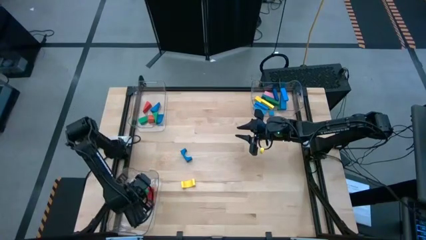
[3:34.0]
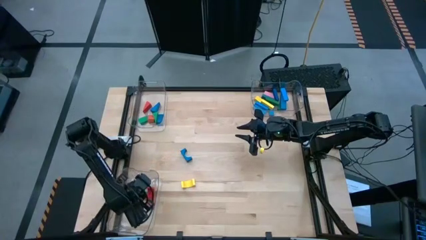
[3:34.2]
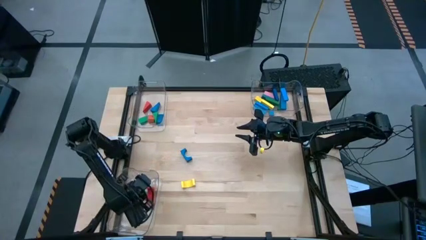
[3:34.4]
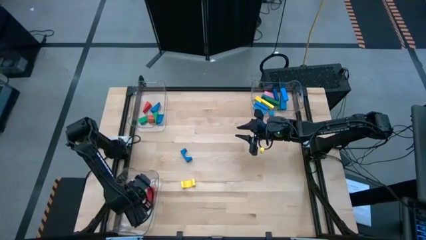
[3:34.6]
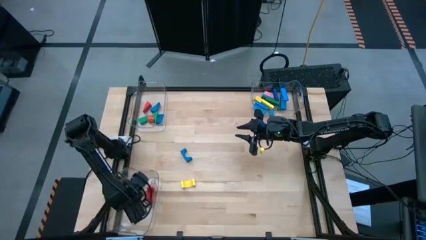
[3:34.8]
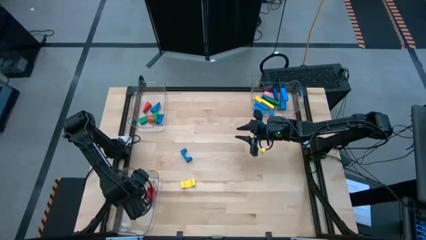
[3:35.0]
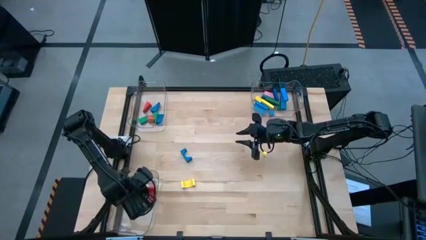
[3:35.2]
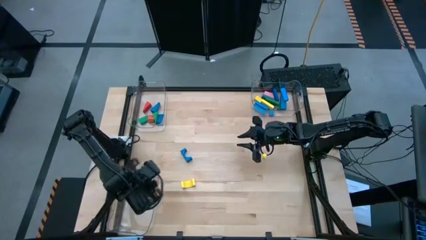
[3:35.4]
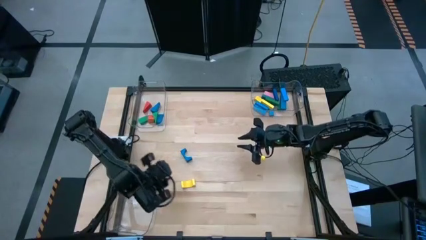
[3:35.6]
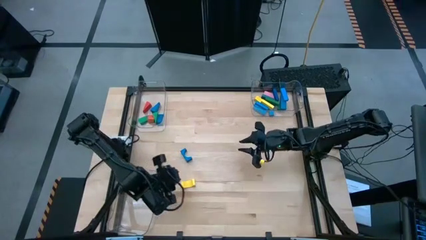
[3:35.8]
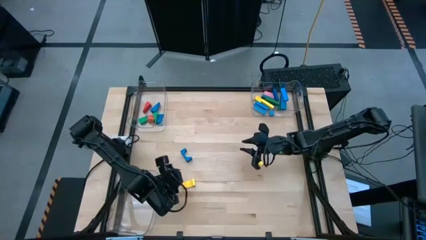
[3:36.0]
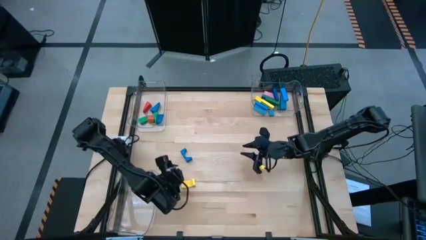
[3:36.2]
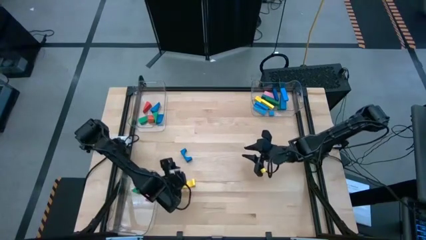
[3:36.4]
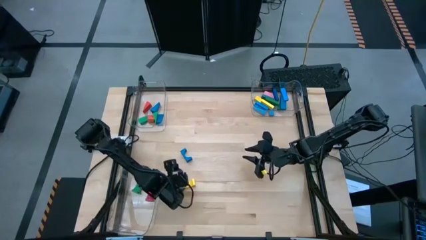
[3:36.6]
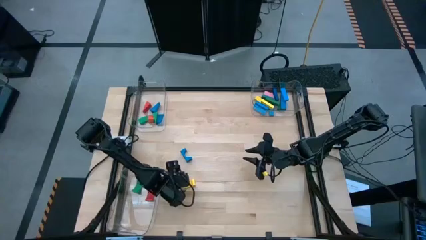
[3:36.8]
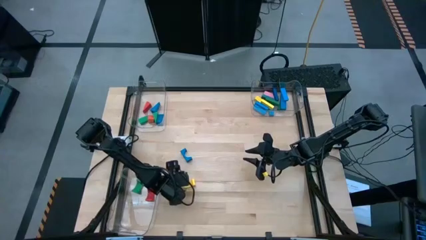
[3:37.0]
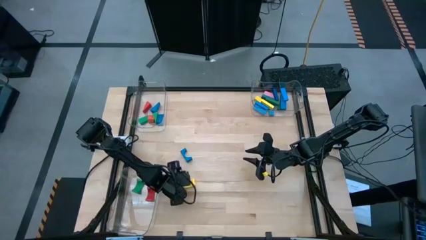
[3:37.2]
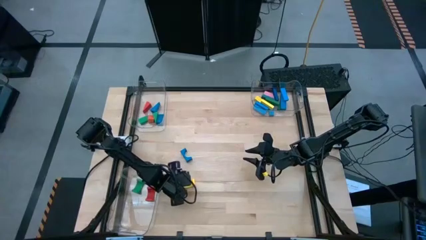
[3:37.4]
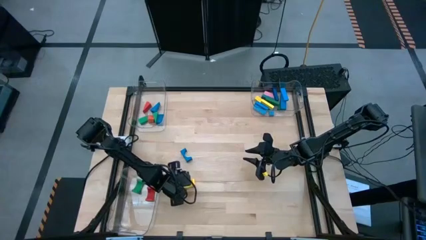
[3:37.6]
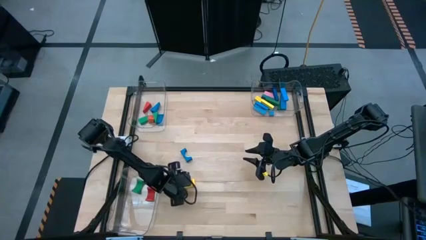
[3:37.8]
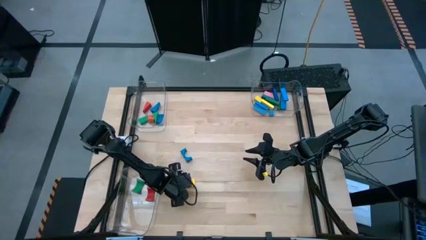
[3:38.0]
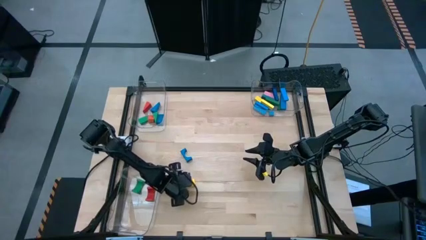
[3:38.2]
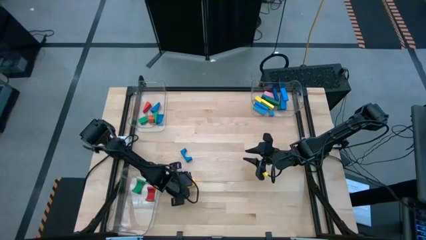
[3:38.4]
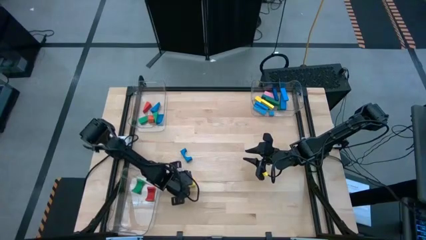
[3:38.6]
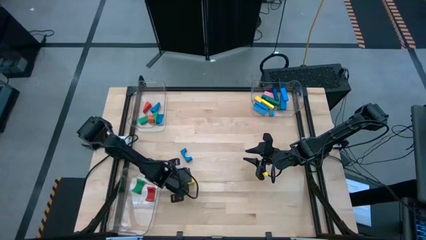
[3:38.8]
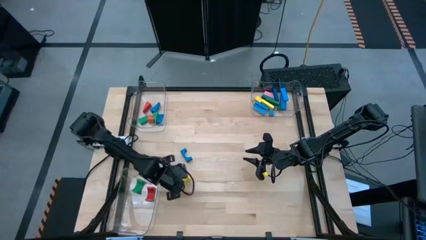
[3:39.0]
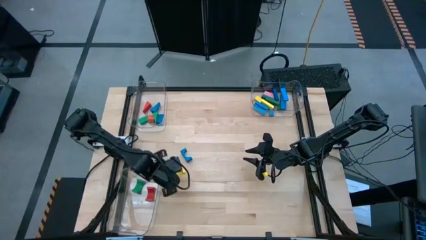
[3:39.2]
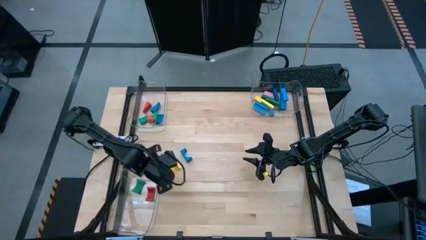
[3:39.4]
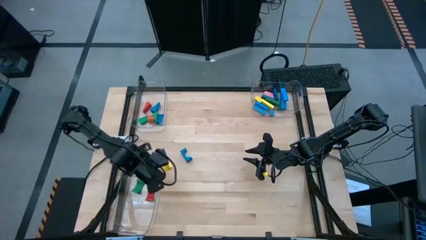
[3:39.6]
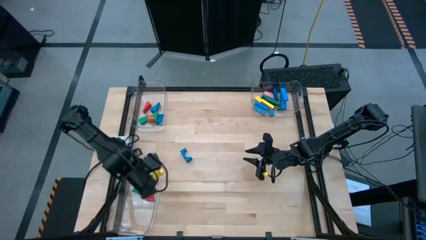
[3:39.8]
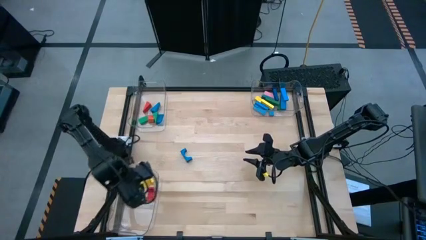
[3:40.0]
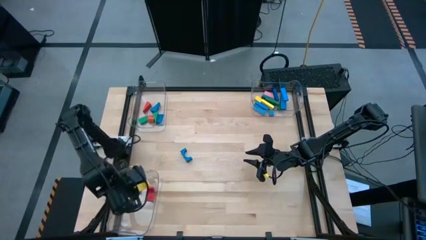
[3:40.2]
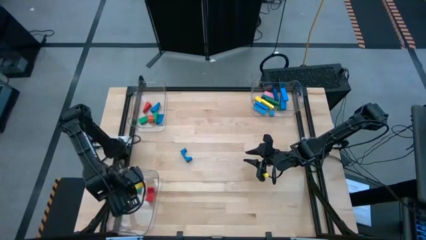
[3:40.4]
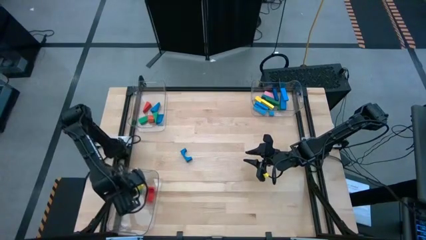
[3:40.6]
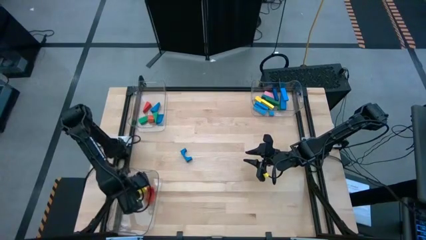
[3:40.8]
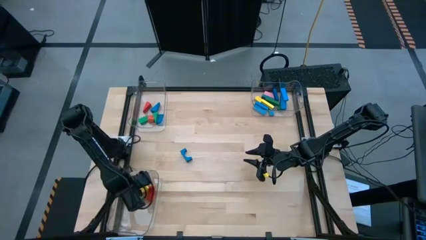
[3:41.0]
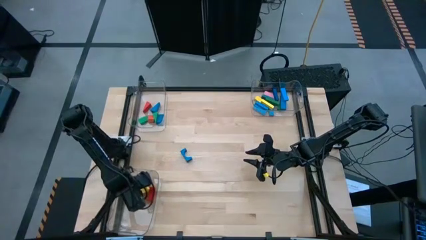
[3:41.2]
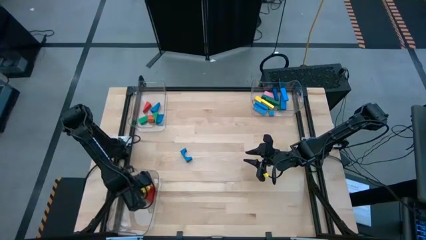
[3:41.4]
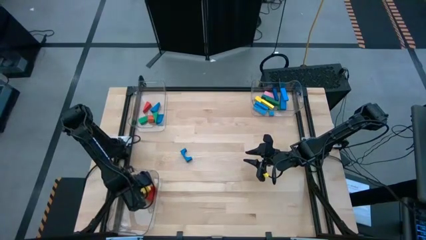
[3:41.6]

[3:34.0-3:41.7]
Task: Sort blocks by size
Put the yellow arch block into the bottom left transparent bin

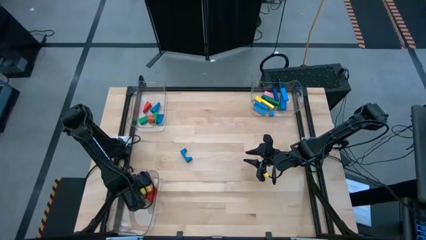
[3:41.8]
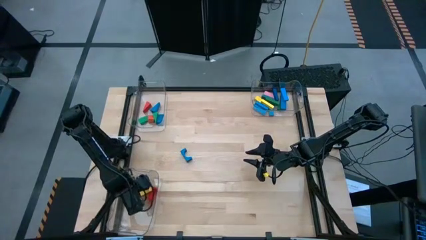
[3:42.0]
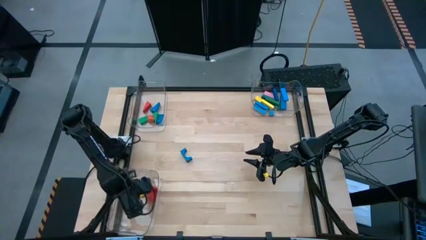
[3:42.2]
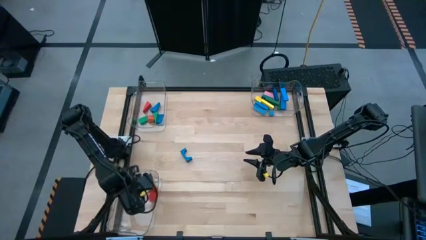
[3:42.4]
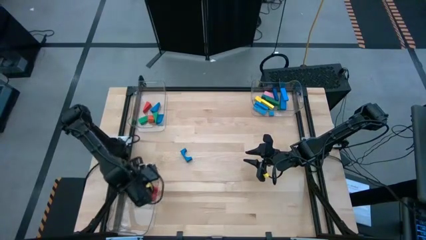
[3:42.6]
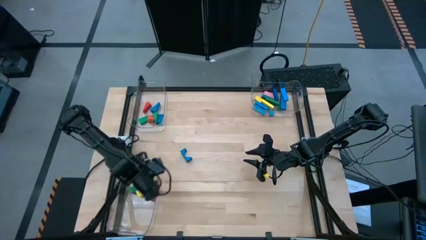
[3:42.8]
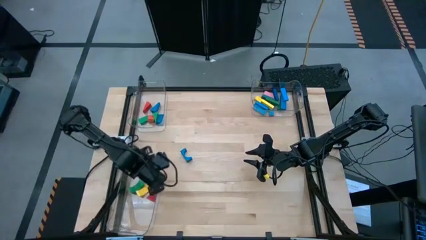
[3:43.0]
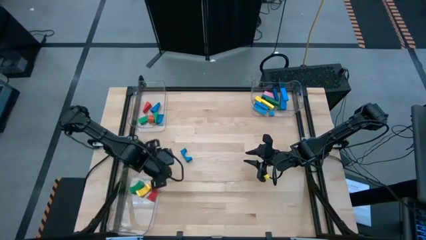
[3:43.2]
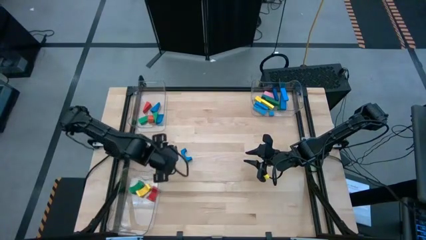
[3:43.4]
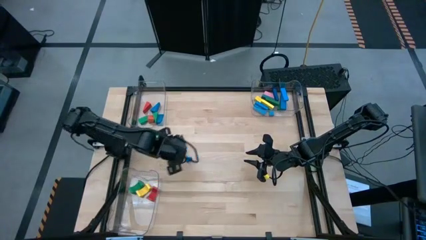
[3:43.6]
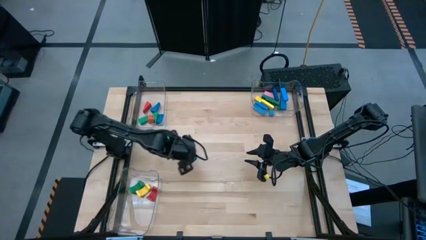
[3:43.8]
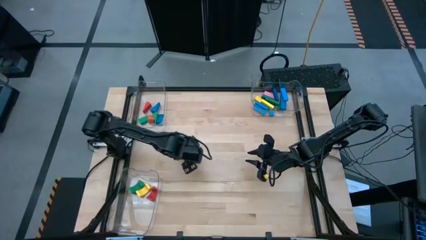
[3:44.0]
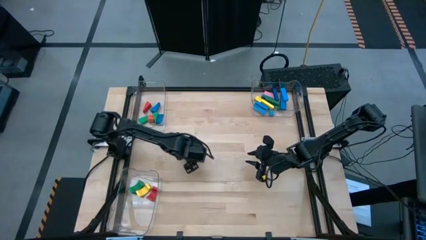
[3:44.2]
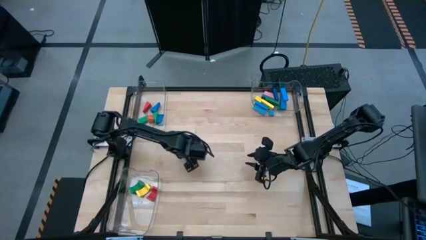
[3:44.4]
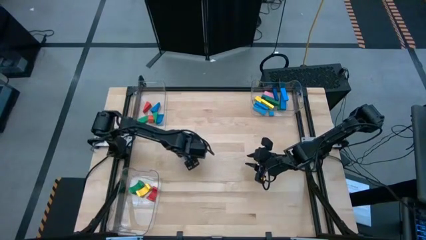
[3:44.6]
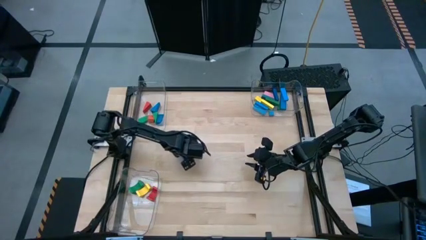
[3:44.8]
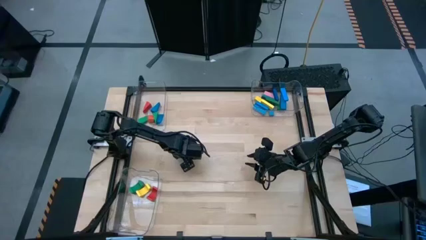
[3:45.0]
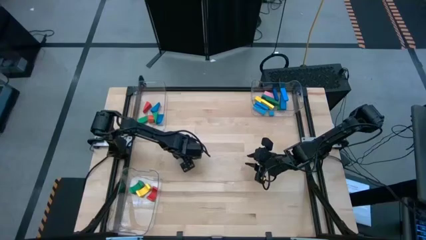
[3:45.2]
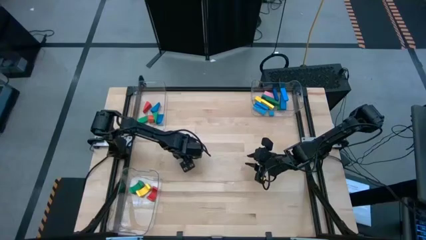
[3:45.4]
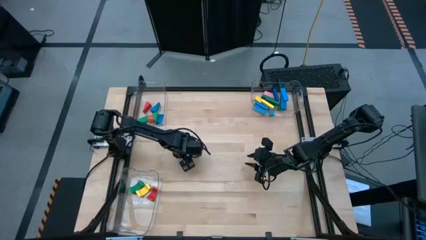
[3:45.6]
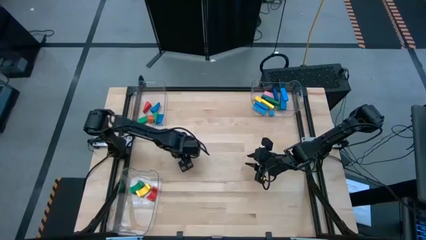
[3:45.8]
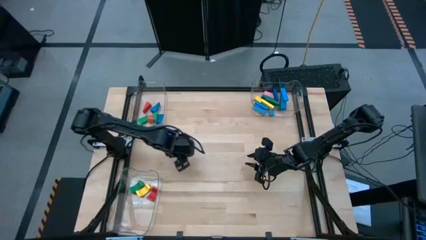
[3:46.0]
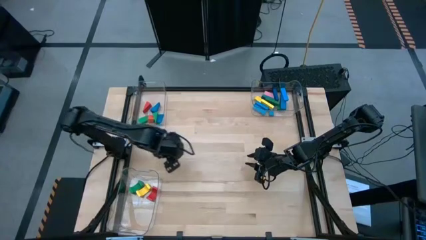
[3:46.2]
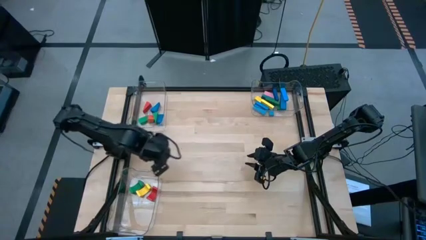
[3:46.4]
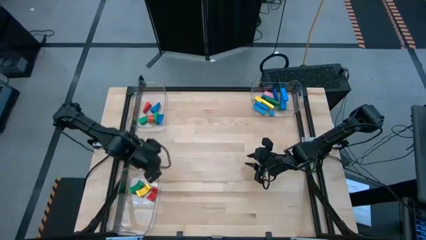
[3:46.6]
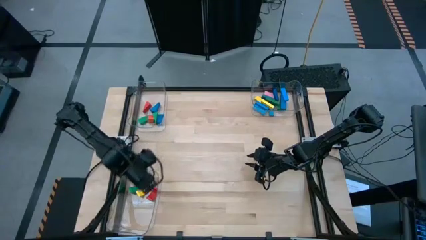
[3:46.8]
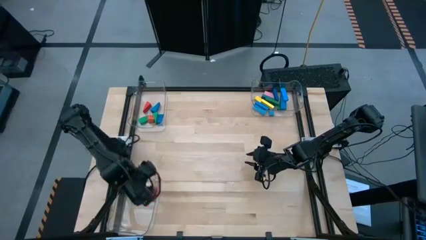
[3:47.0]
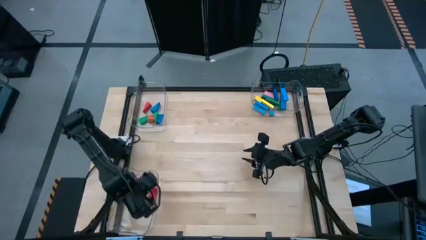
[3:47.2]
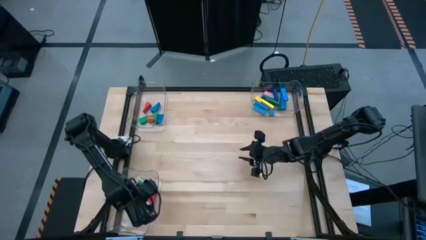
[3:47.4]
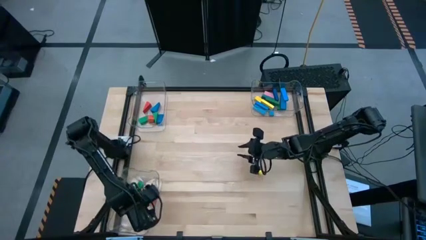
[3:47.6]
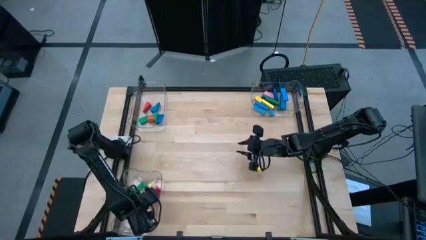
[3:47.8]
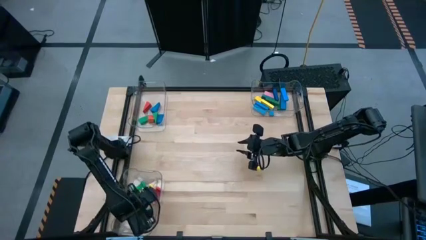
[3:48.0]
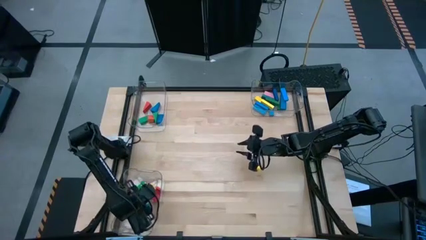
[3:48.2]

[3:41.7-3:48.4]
Put the blue arch block into the bottom left transparent bin

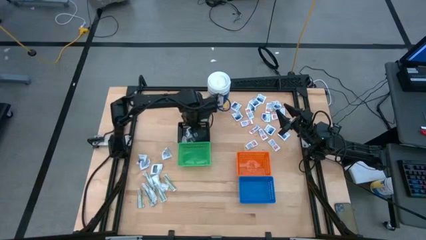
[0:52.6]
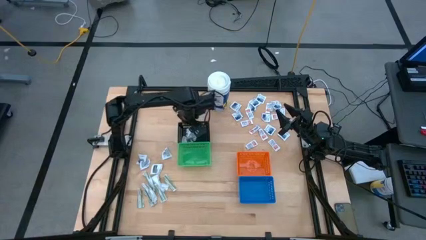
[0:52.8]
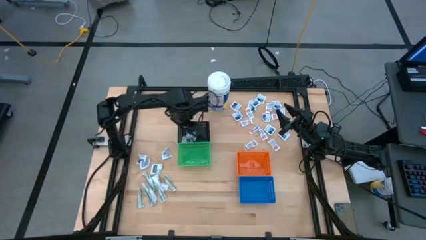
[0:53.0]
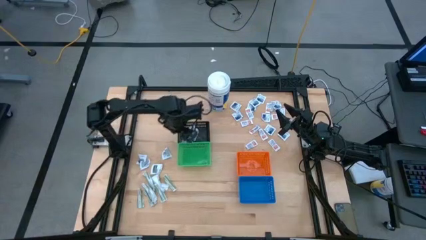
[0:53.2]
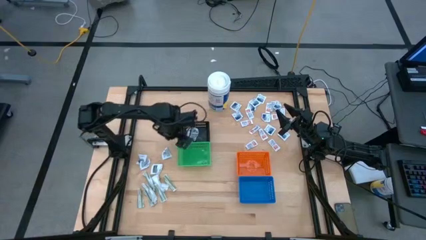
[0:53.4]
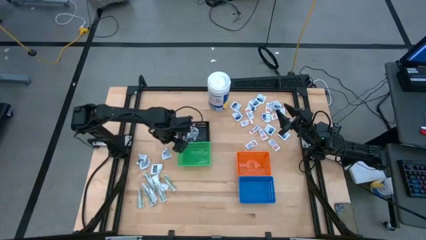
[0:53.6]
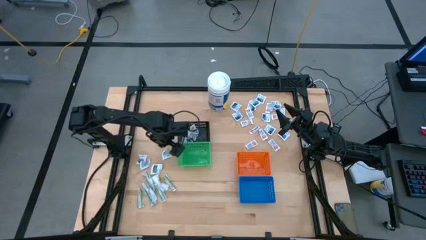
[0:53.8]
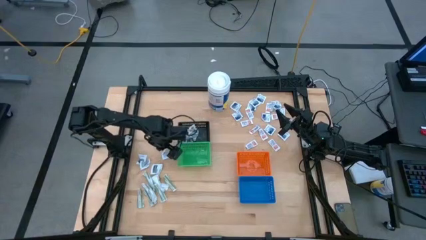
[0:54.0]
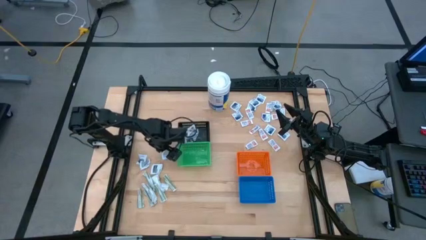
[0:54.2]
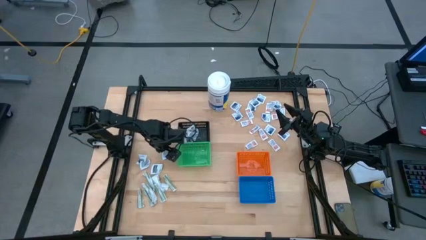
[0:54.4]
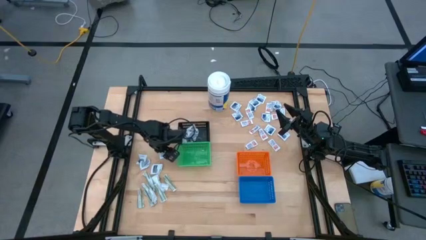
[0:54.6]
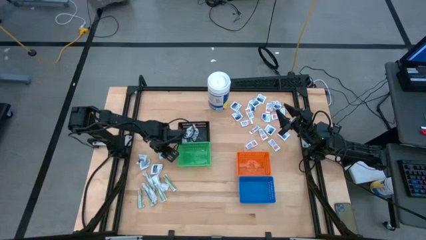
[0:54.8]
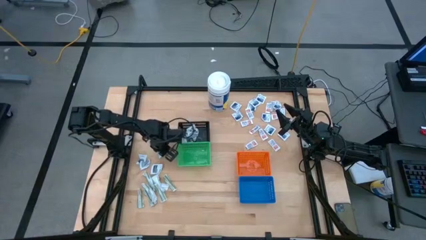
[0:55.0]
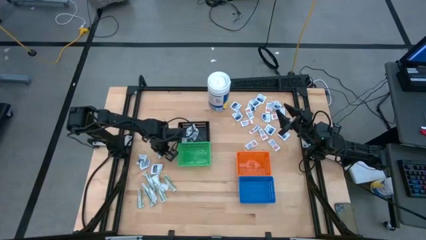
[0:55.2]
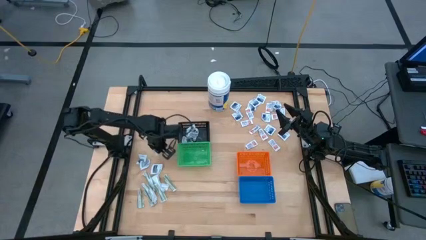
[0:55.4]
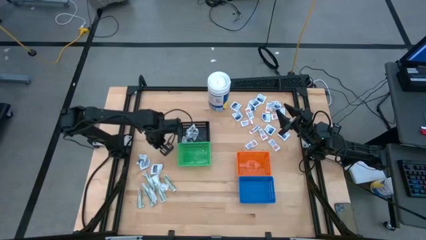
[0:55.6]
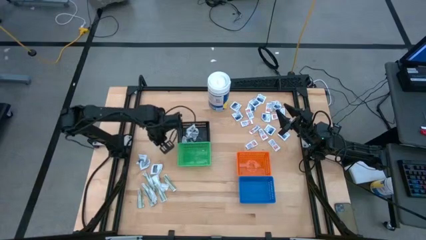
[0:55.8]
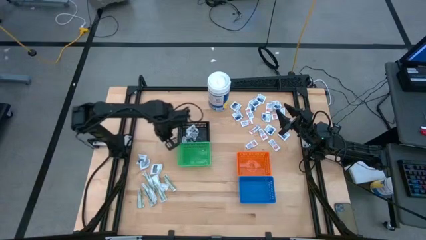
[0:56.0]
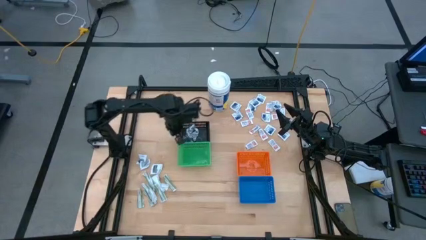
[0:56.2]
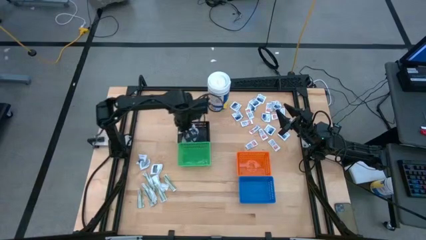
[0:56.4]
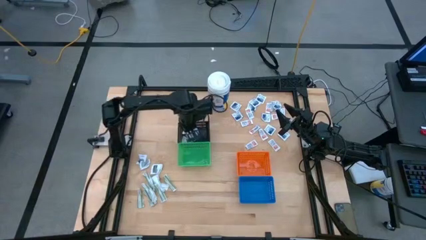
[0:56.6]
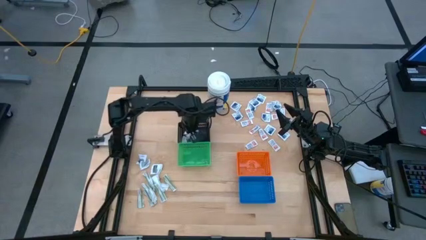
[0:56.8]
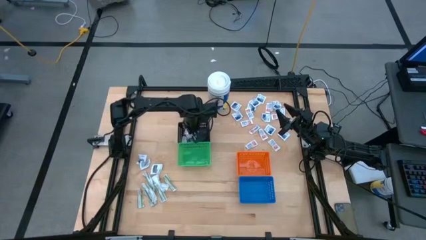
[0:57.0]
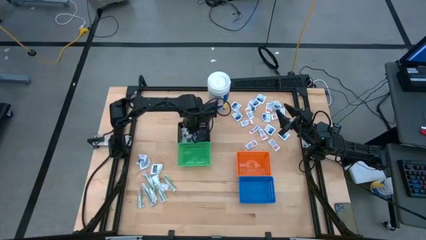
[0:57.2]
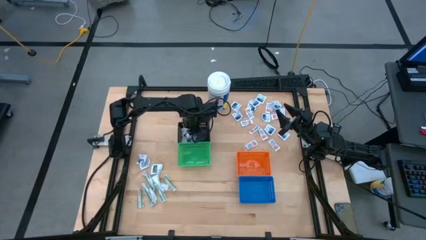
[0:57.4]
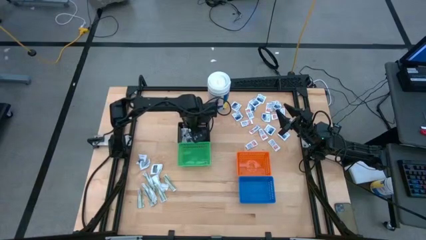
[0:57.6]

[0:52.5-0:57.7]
Task: Pick & Place First Aid Supplies
Put the black pad into the black bin
